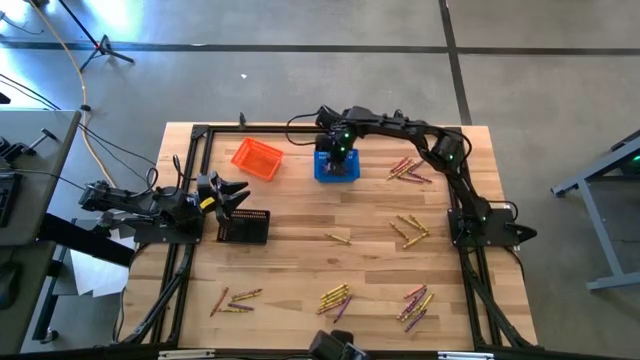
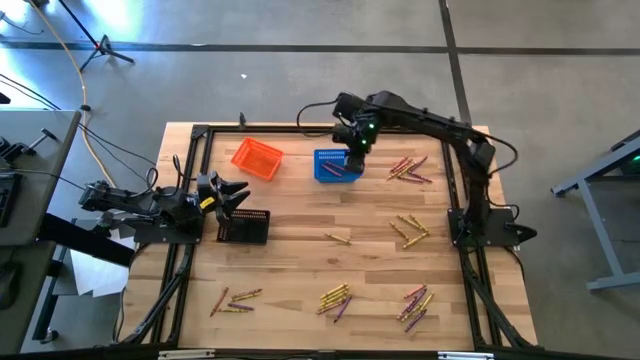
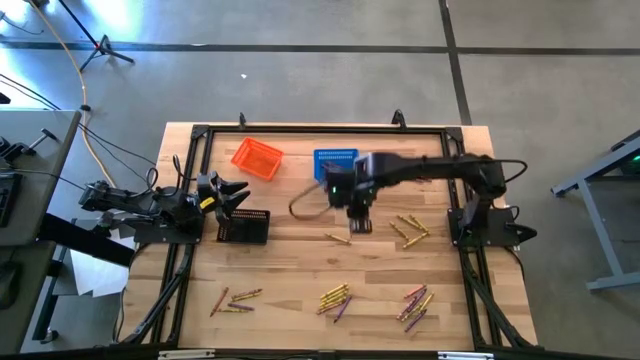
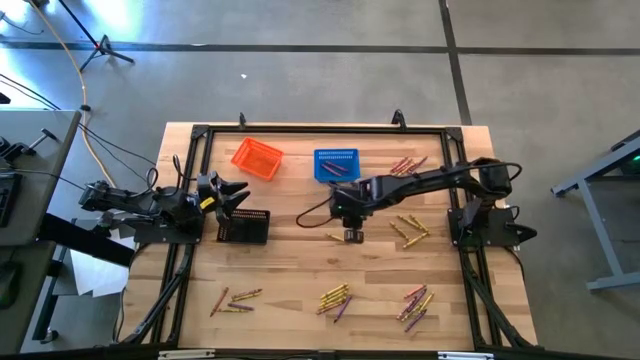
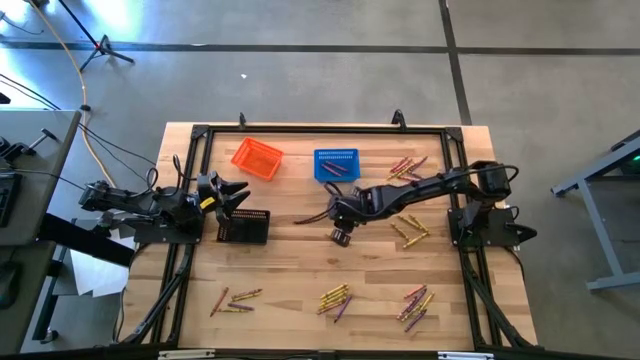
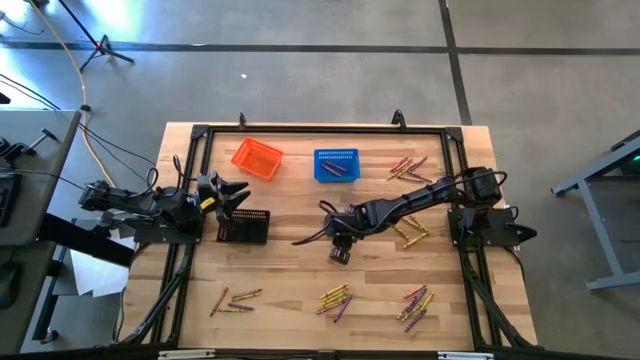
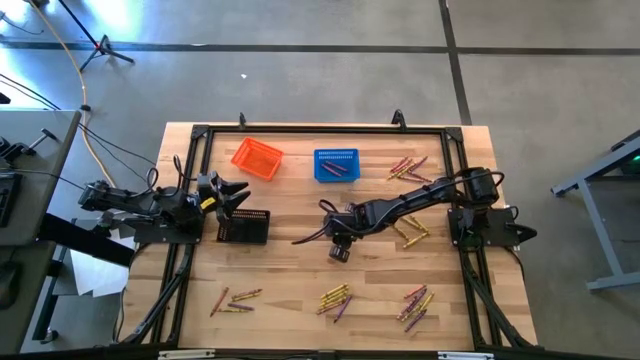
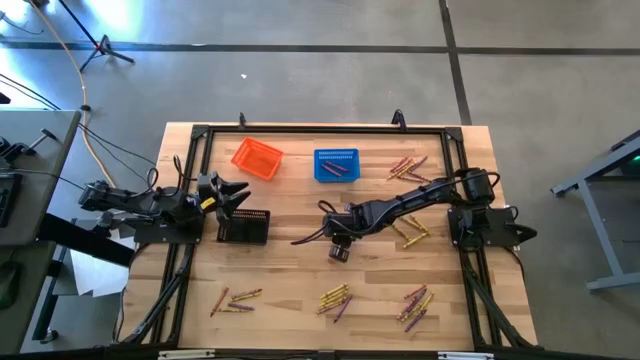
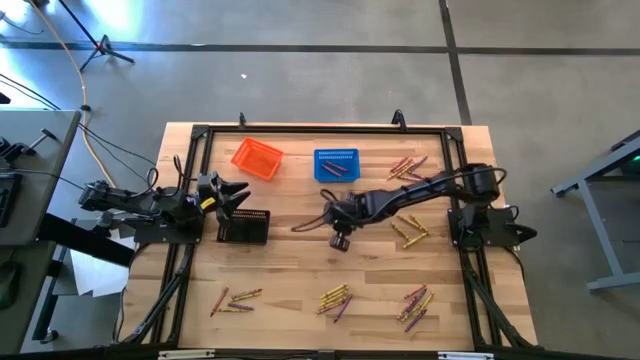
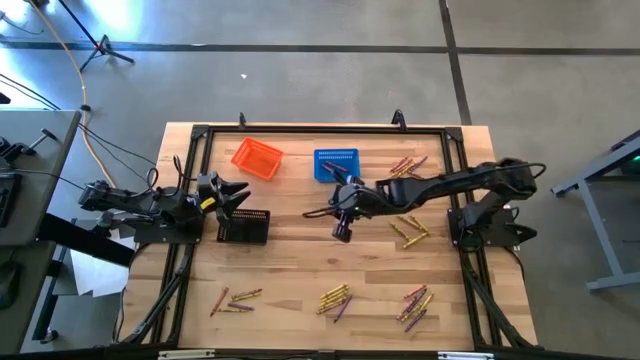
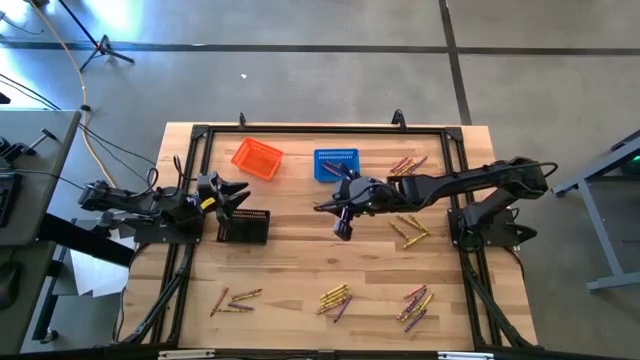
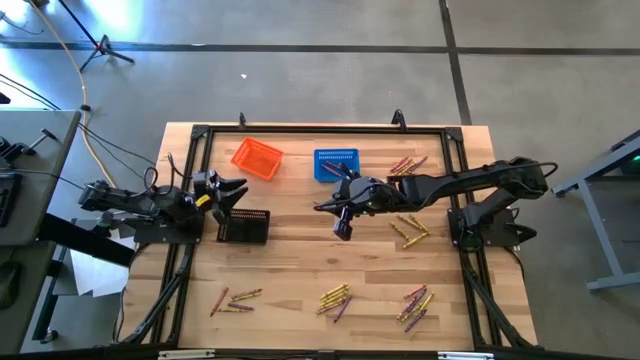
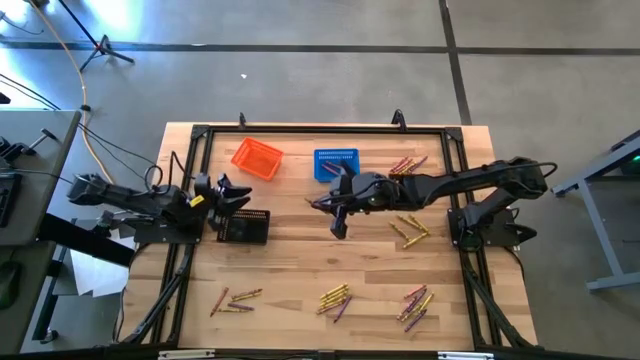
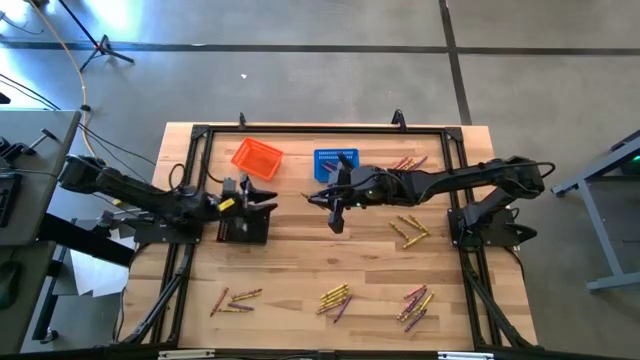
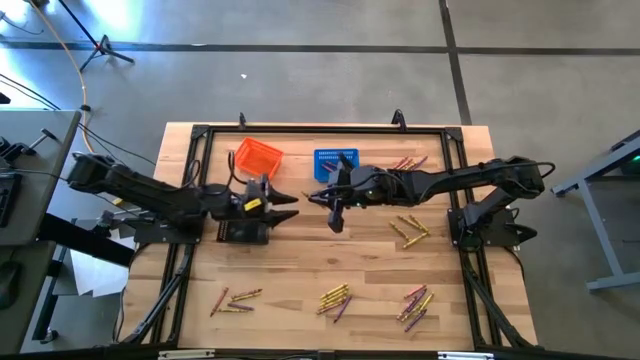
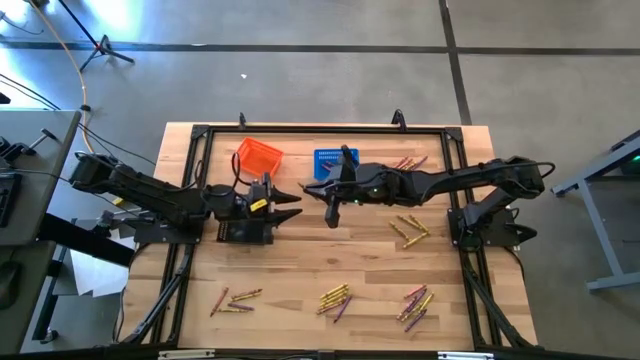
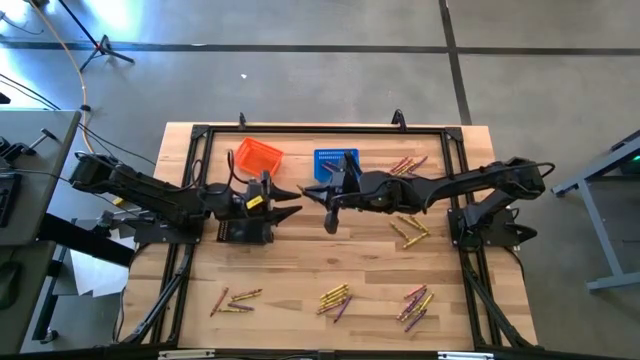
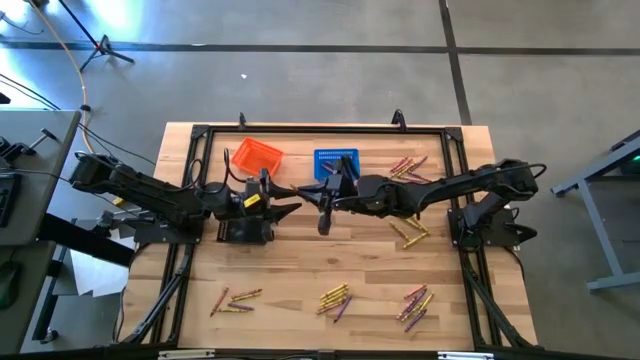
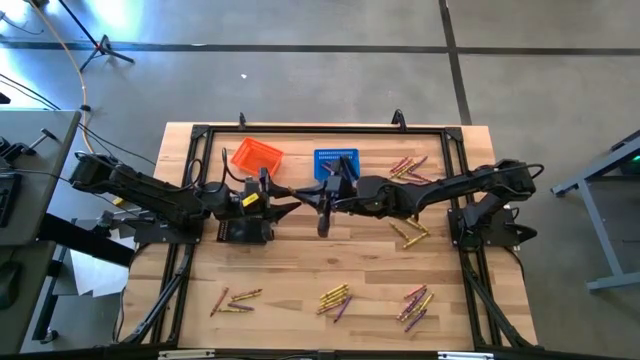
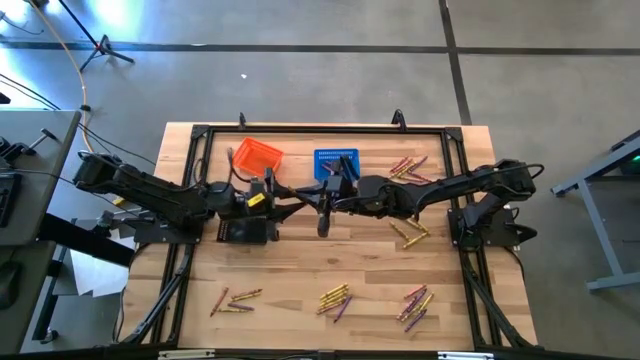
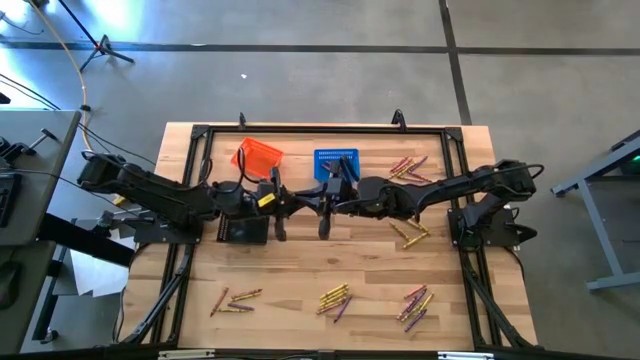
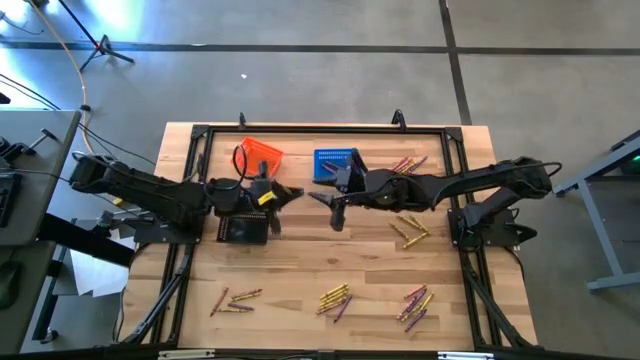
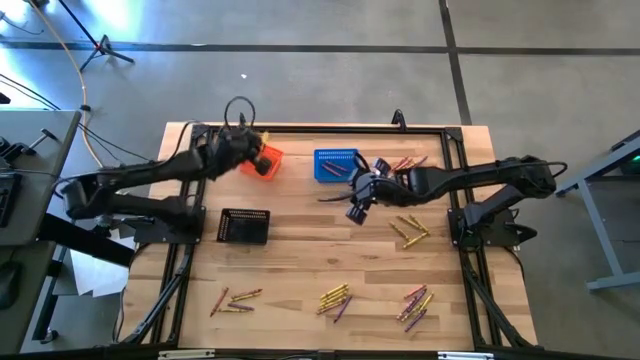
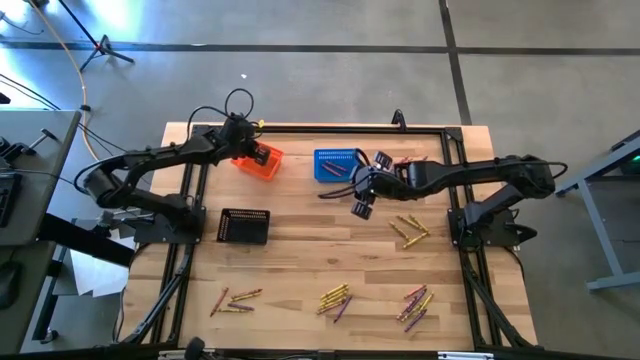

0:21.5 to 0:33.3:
Task: Sort crayons
Put the yellow crayon into the orange bin

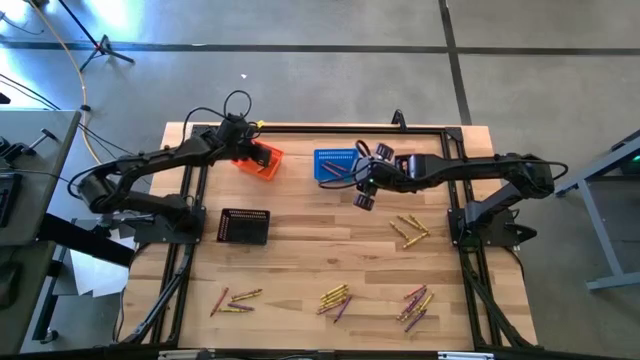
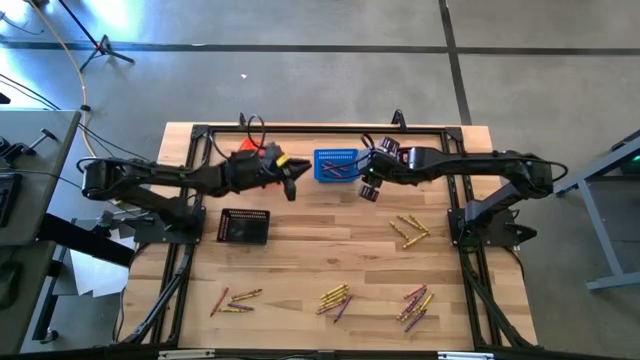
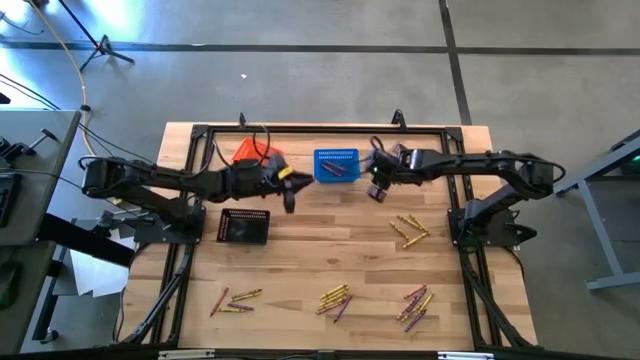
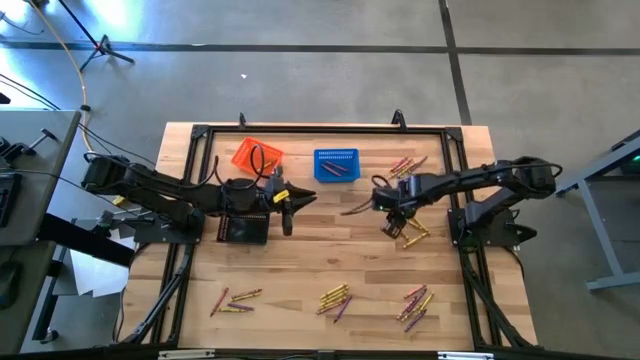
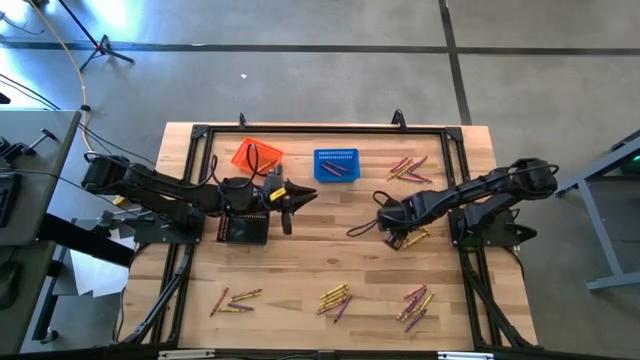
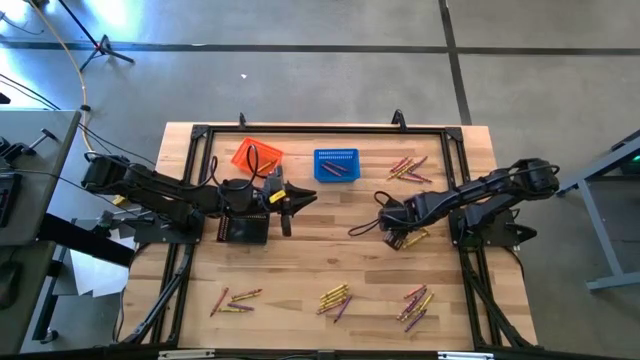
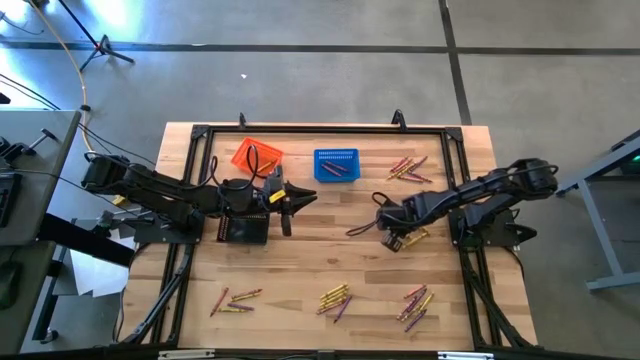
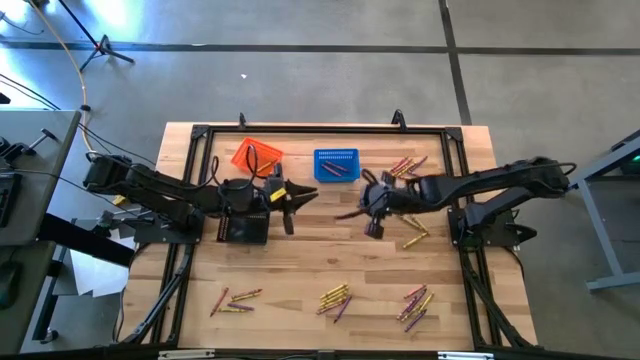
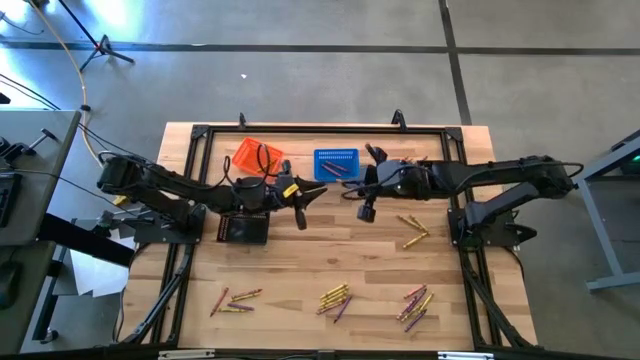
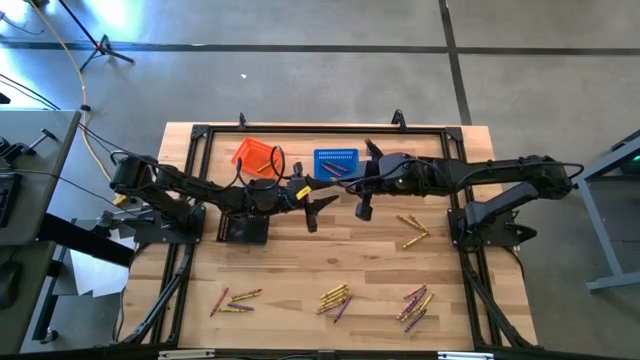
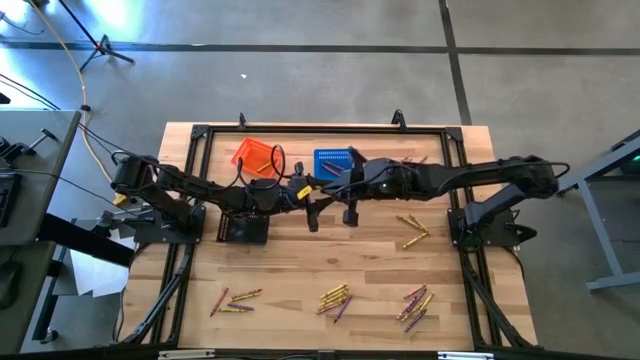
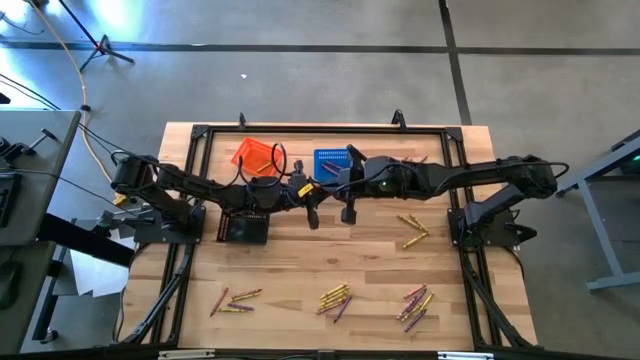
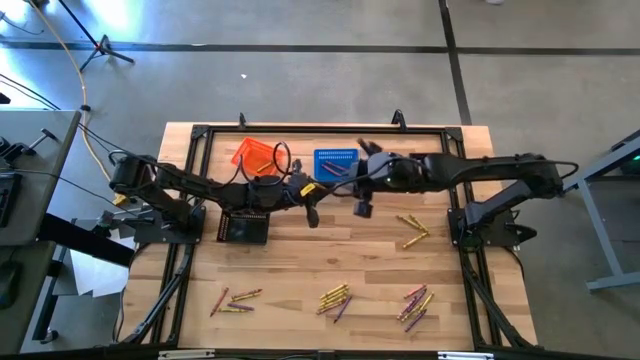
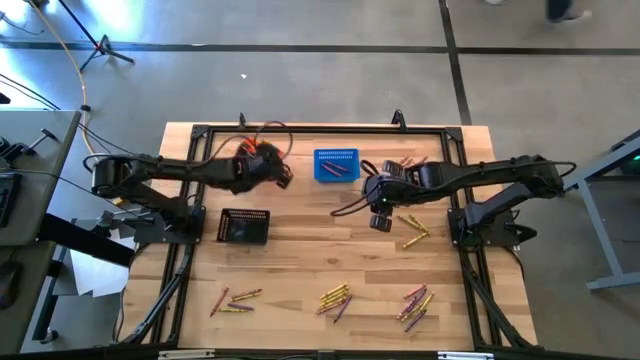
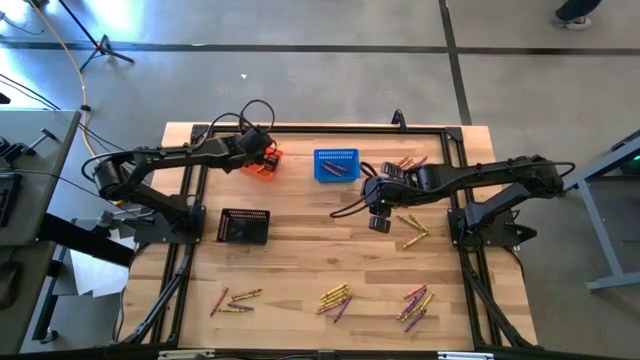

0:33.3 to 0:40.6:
Put the yellow crayon into the orange bin

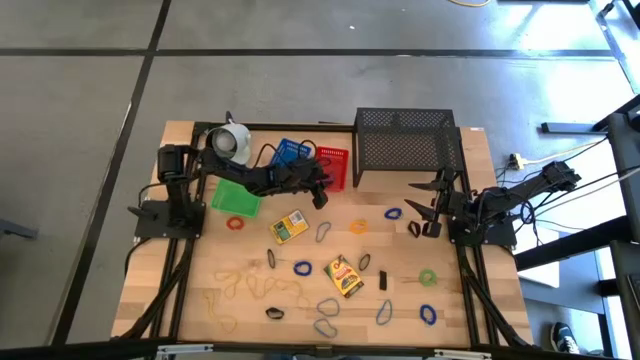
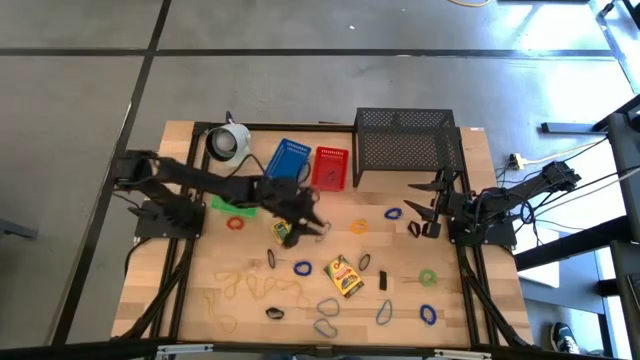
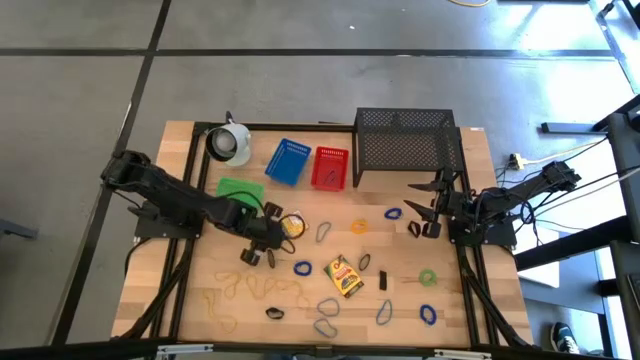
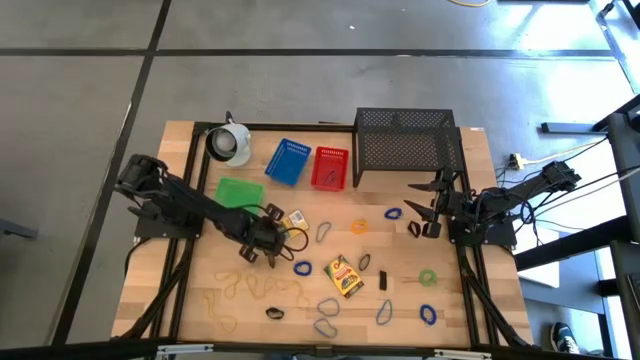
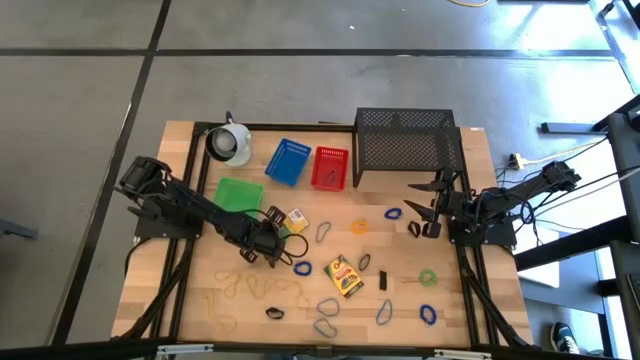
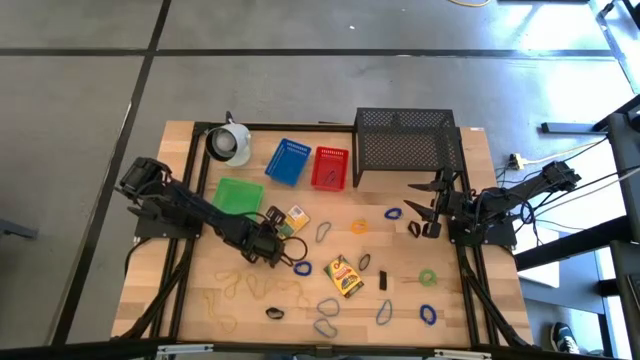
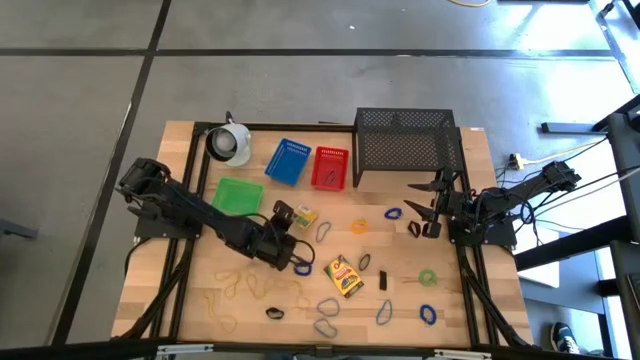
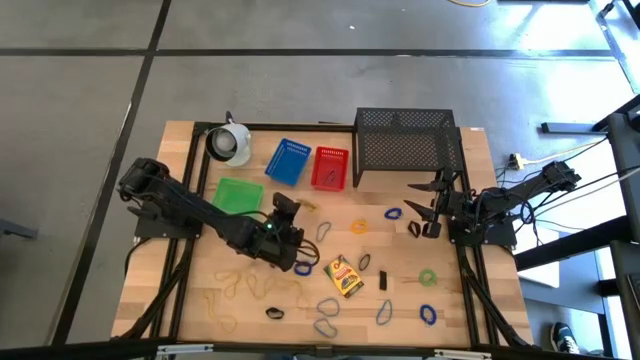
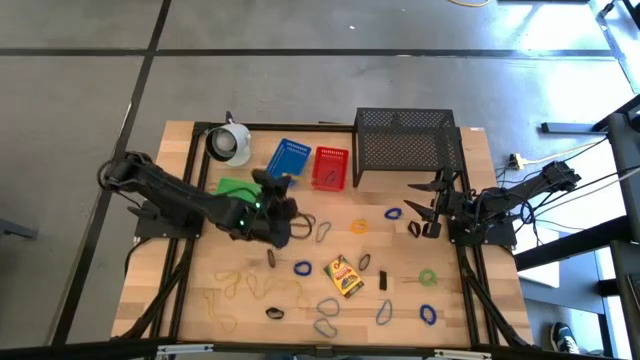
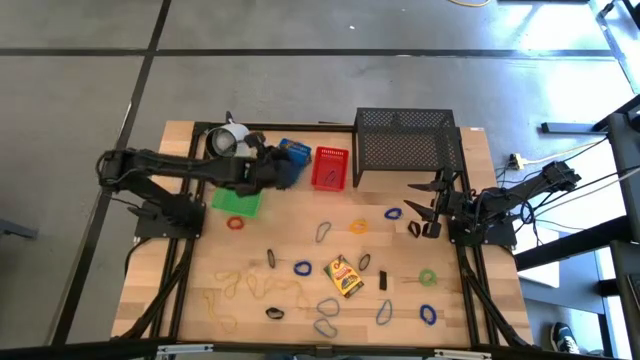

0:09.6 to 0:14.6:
Task: Pick & Place Office Desk Supplies
Put the yellow crayon box into the blue bin
